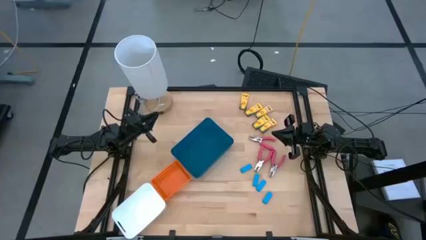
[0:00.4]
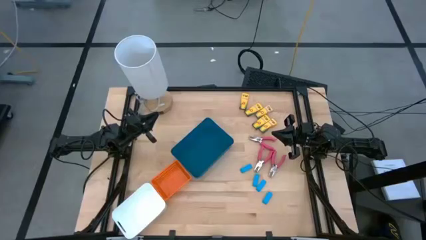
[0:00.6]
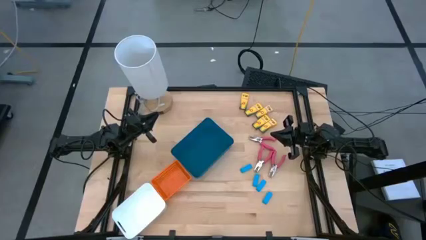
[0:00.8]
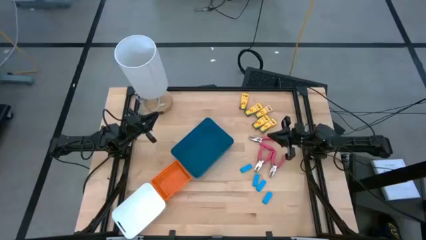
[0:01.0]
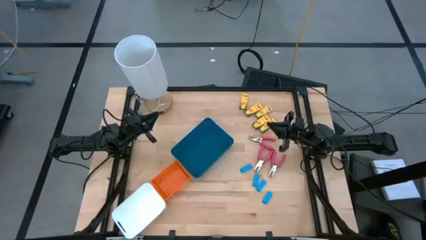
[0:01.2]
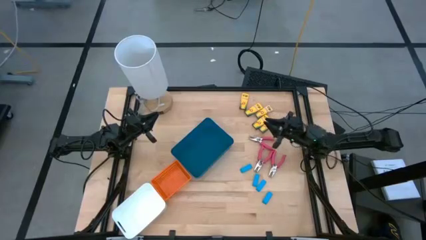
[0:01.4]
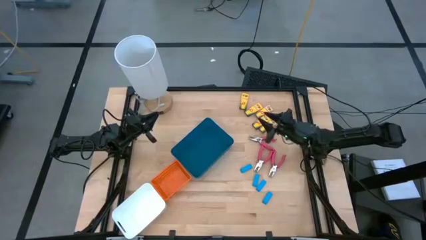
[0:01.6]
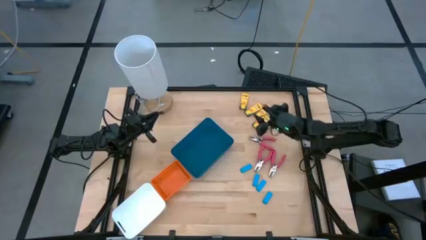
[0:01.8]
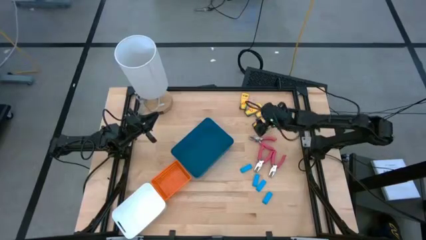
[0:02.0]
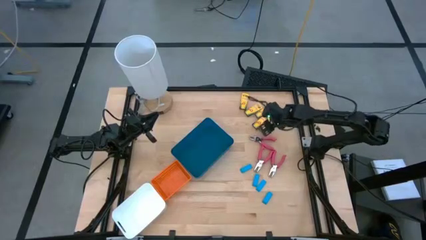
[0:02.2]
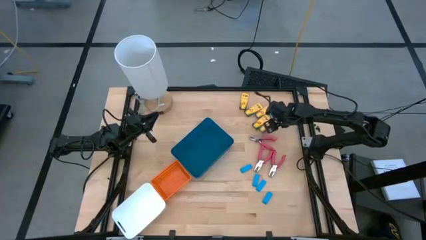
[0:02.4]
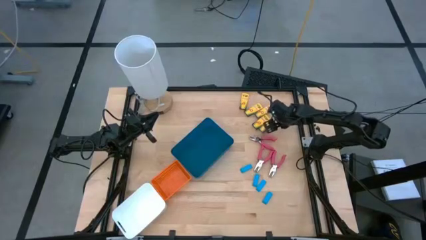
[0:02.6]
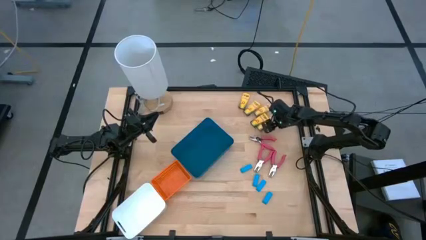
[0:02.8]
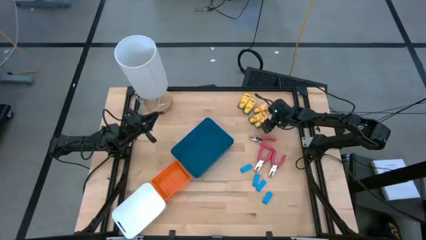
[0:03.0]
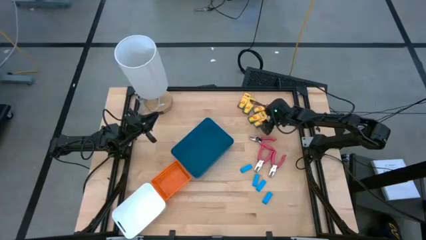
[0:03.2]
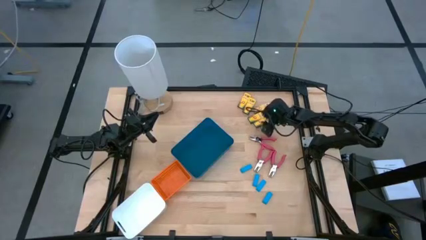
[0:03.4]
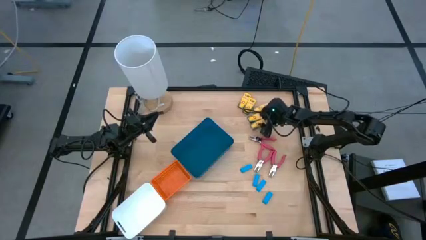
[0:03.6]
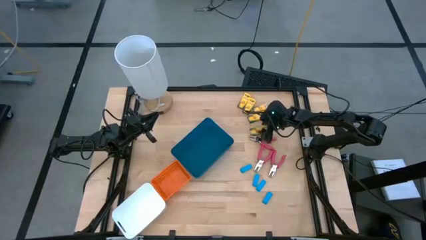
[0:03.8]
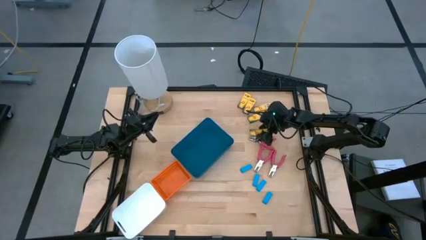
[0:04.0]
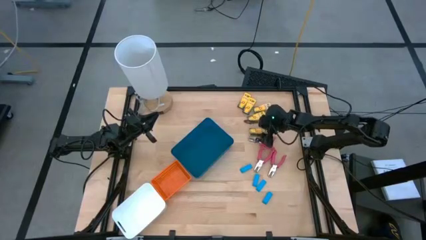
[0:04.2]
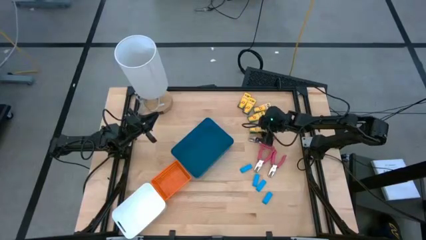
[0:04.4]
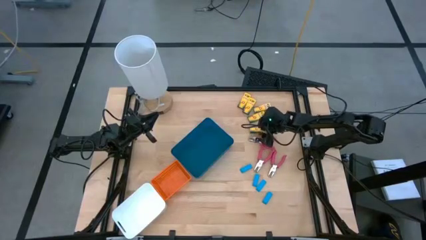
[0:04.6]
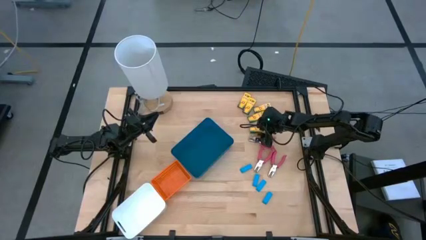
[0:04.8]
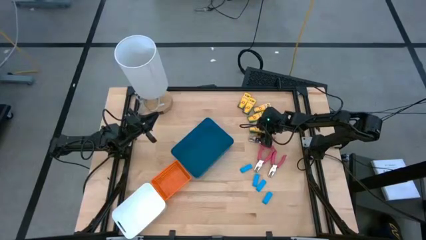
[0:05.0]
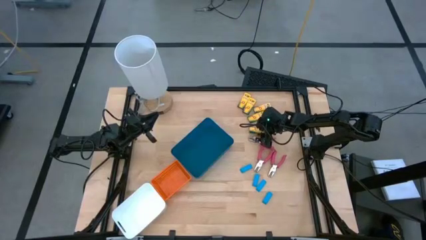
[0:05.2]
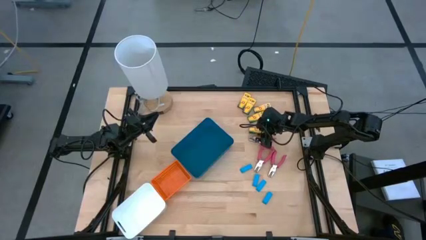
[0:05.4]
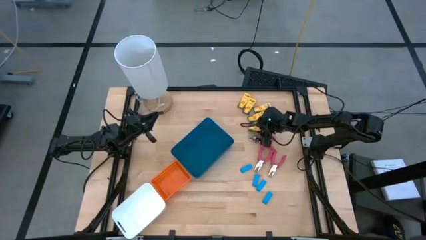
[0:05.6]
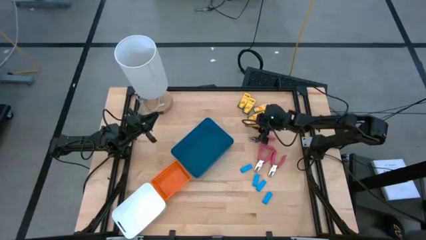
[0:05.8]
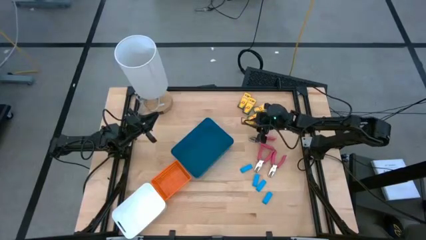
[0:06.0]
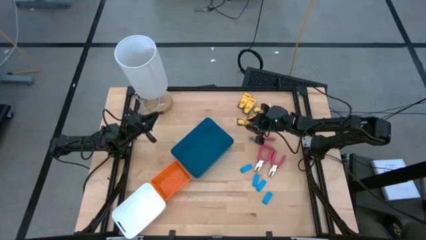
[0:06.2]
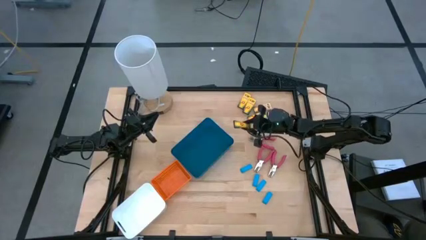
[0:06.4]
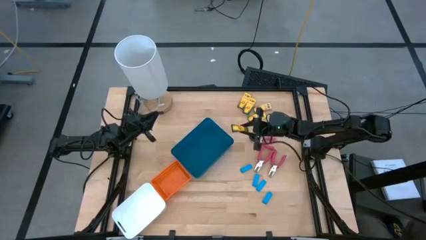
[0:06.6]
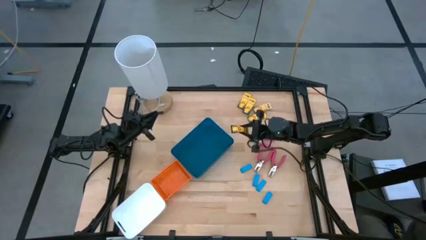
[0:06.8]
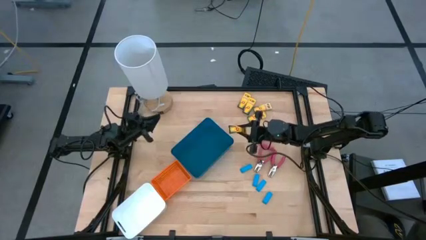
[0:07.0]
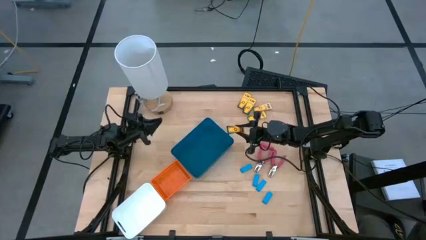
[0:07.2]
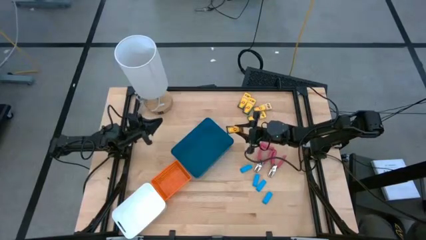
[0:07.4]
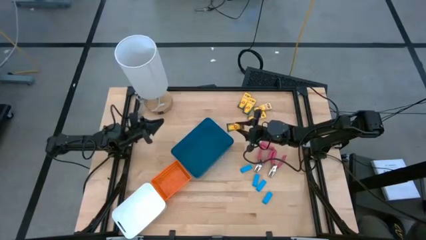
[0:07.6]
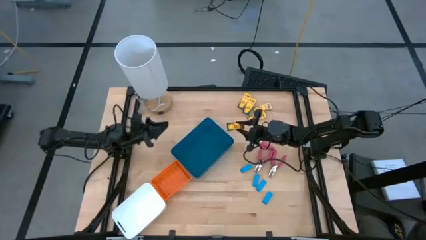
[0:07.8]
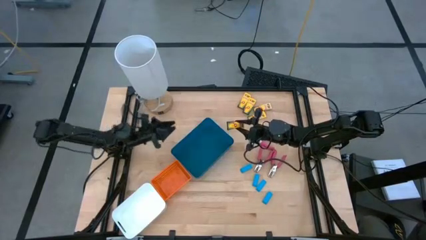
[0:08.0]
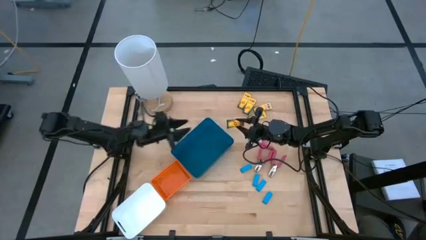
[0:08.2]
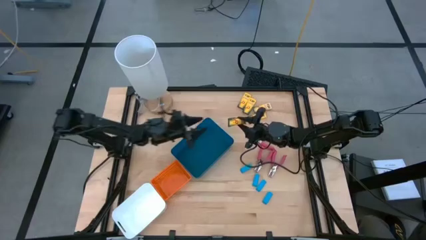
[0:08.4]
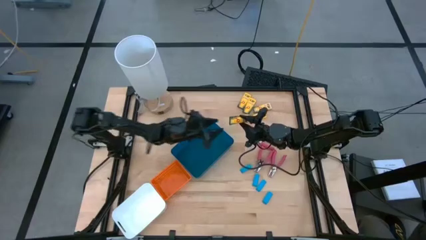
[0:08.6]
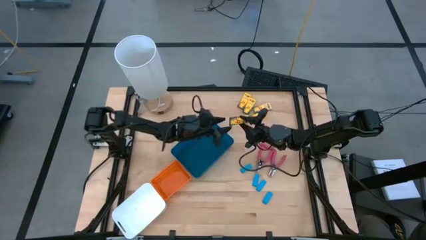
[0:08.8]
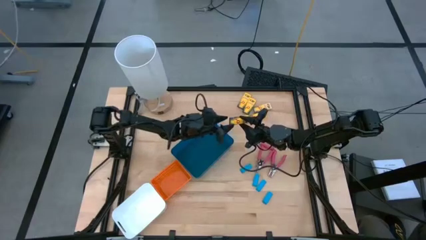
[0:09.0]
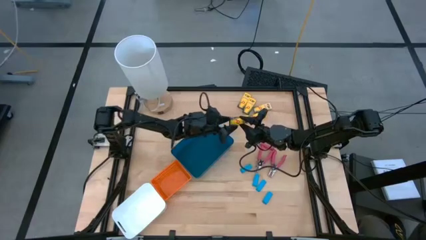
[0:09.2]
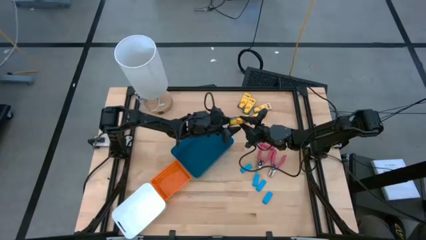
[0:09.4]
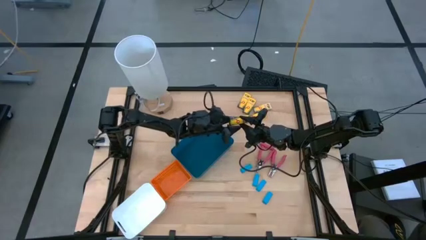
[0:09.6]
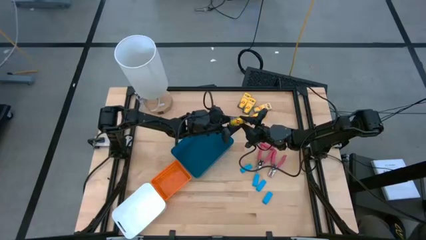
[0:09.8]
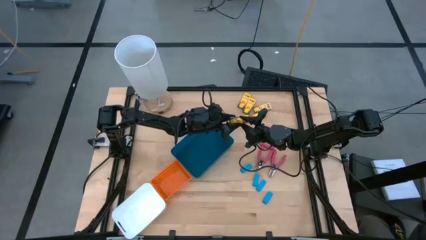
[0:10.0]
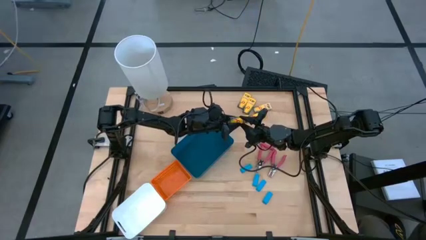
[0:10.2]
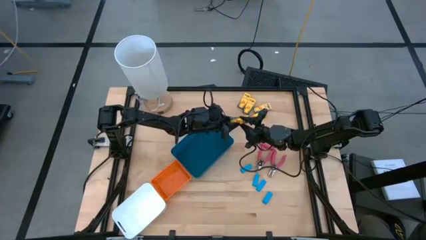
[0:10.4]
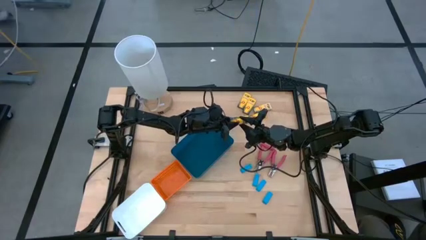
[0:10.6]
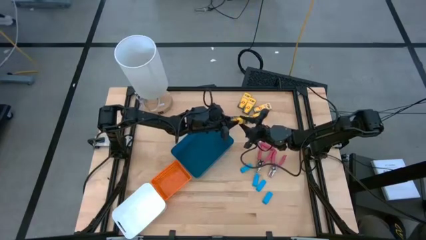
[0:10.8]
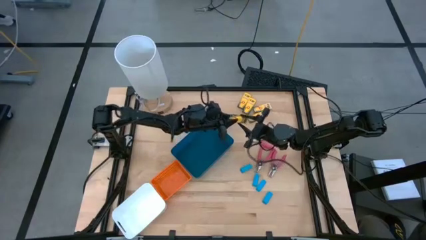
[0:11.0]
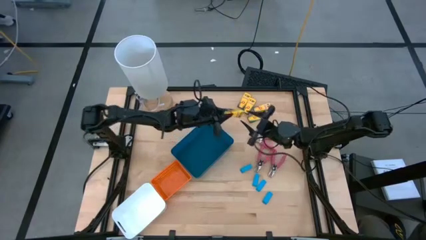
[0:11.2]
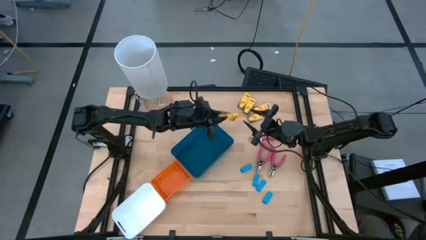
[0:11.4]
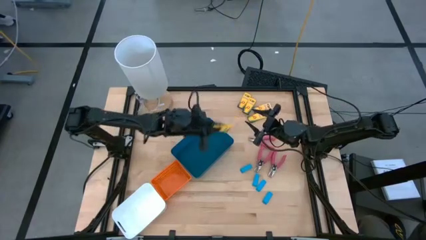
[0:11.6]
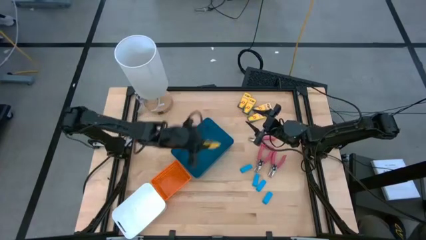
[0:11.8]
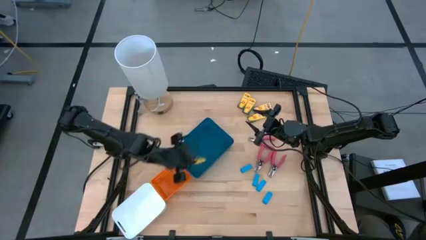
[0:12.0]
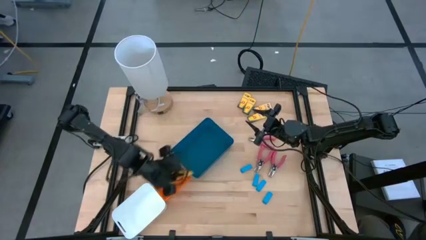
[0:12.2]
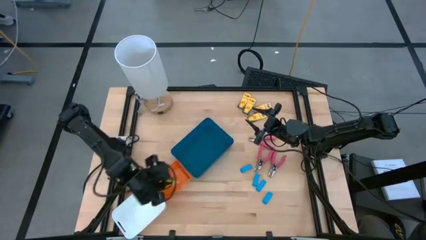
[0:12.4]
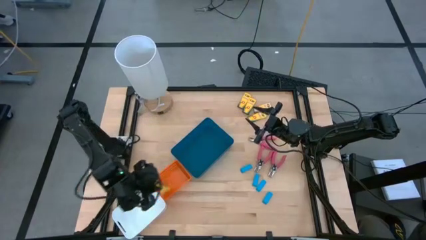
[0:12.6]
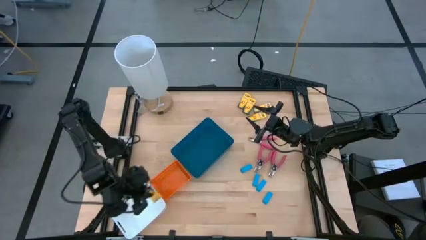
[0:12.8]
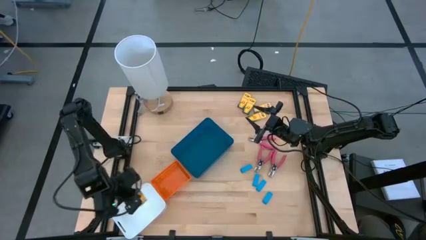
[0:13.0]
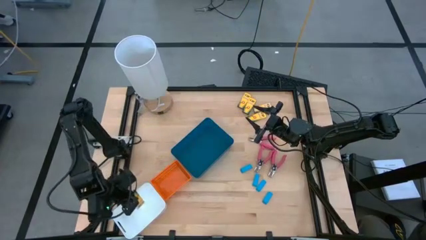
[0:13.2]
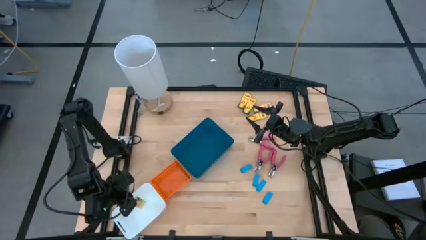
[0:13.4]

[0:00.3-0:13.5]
Task: Pick & Place School Supplies
Put the yellow crayon box into the white bin
